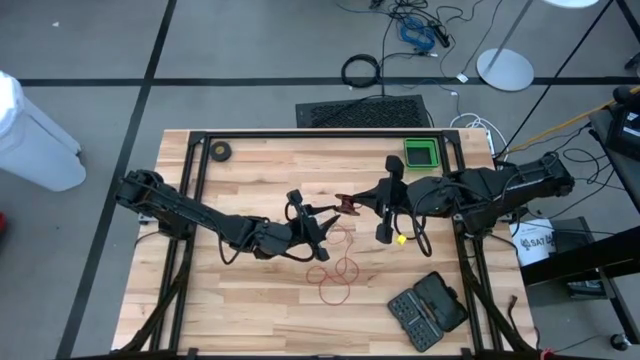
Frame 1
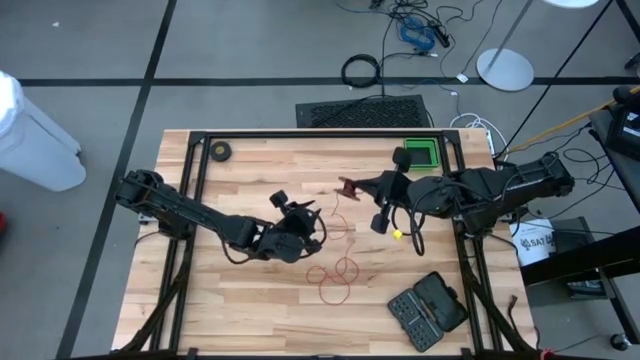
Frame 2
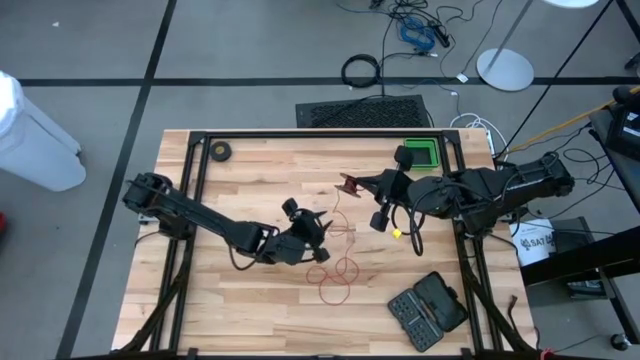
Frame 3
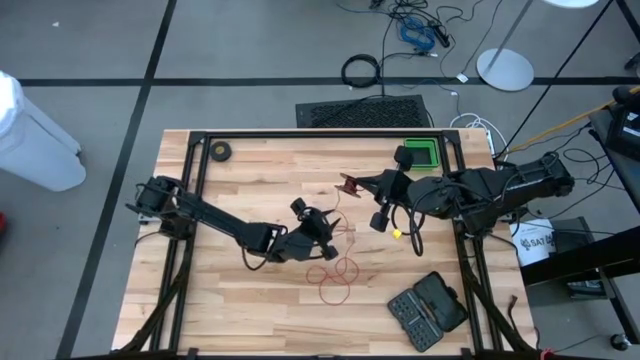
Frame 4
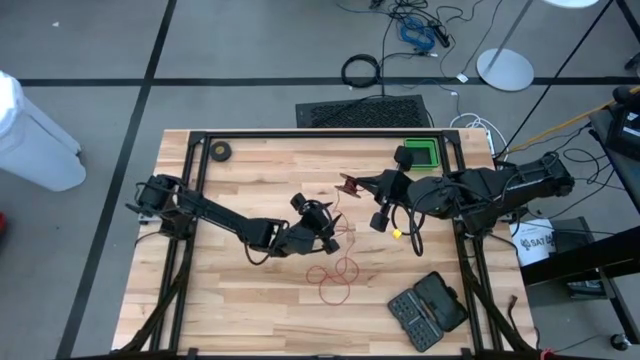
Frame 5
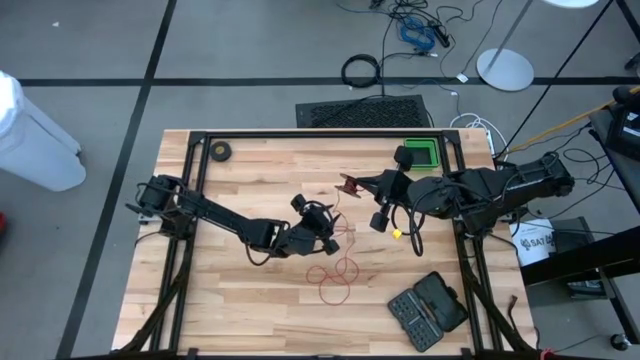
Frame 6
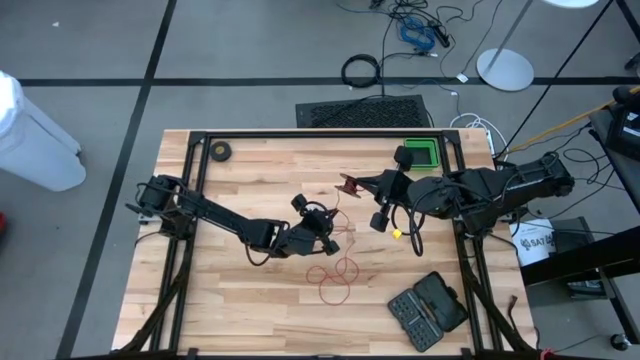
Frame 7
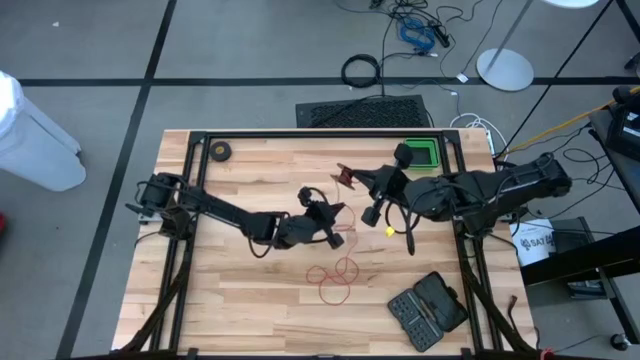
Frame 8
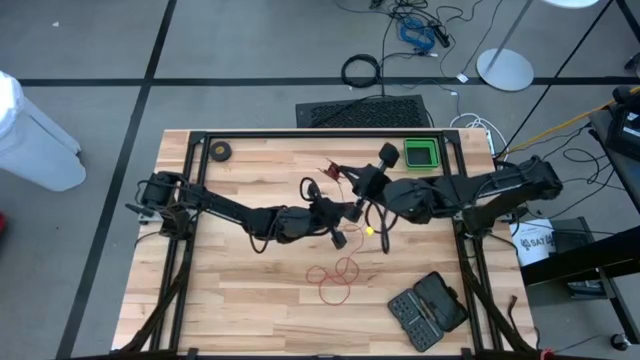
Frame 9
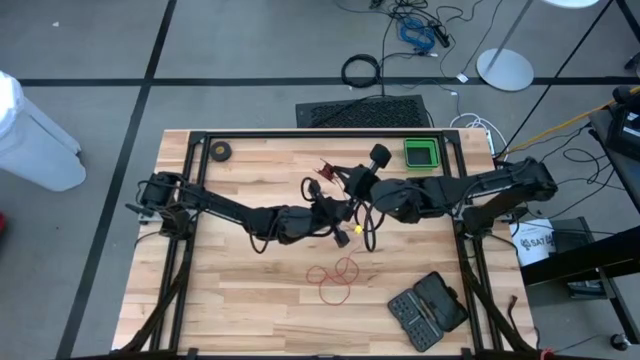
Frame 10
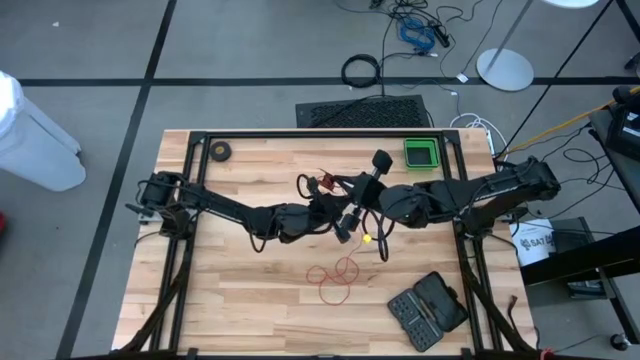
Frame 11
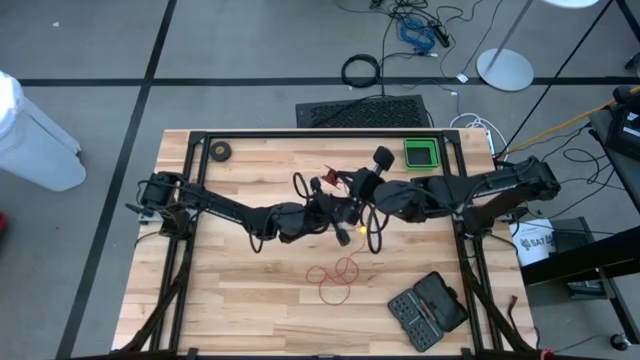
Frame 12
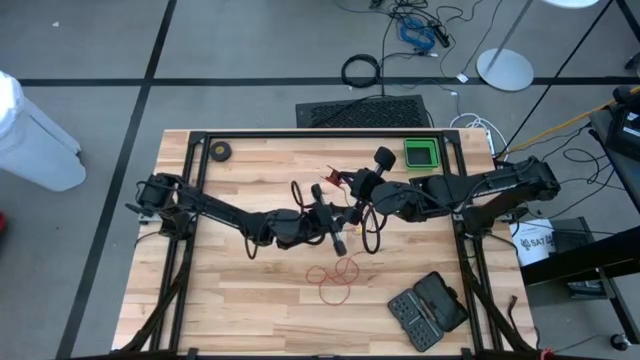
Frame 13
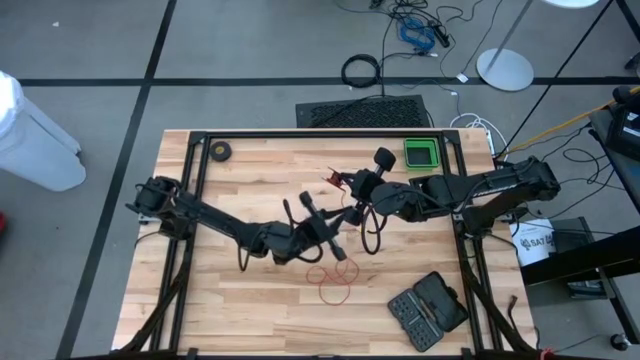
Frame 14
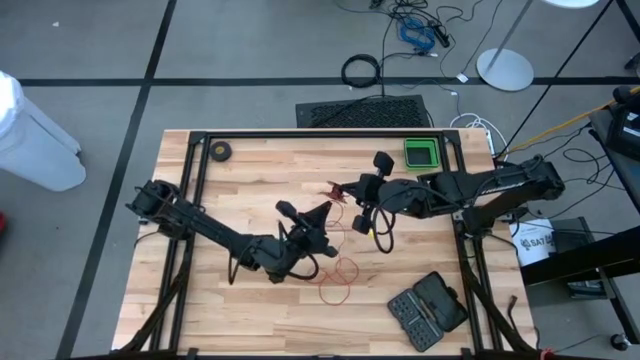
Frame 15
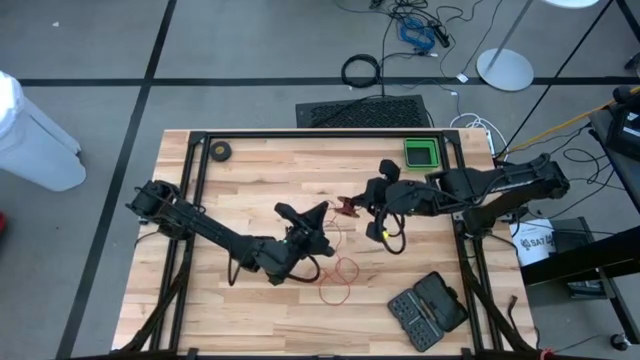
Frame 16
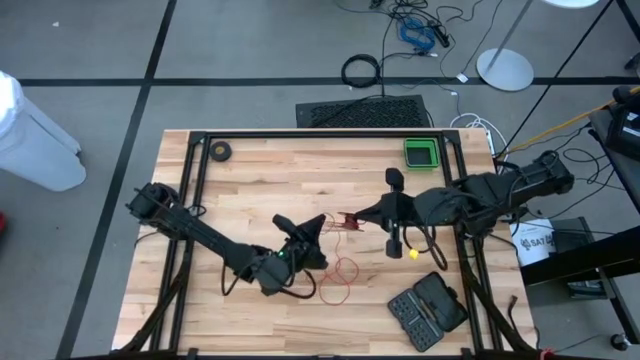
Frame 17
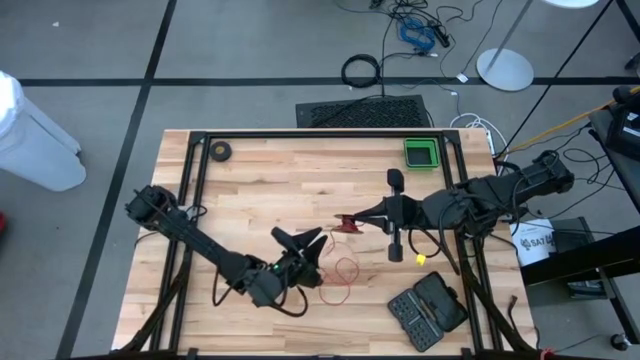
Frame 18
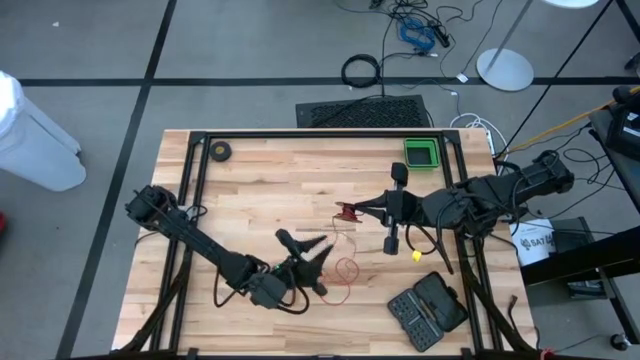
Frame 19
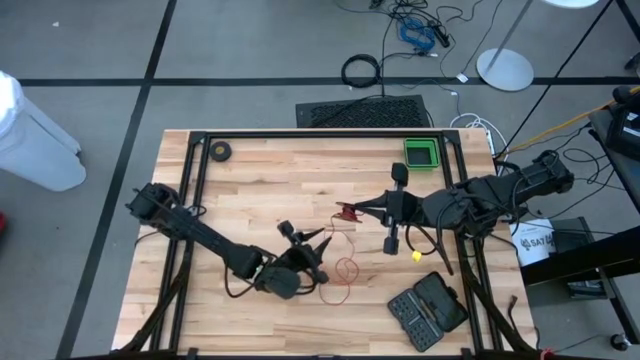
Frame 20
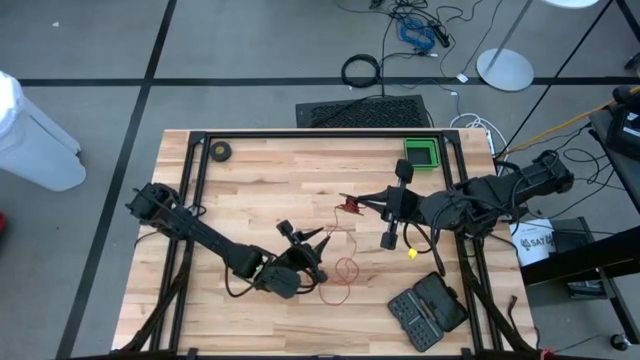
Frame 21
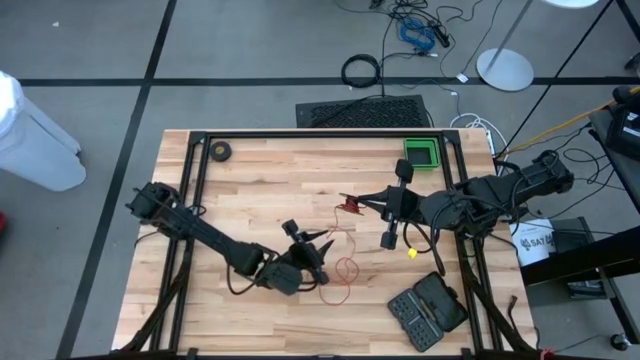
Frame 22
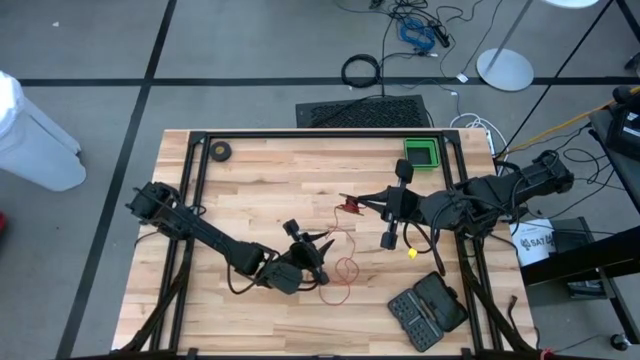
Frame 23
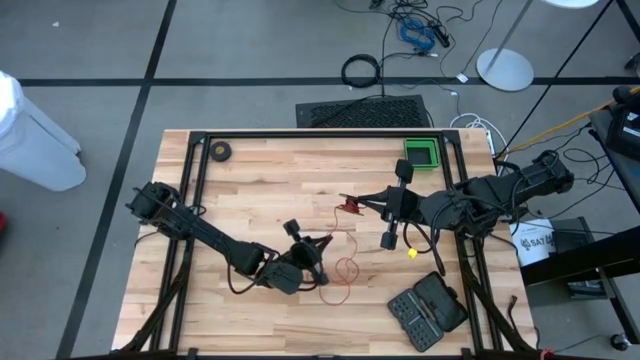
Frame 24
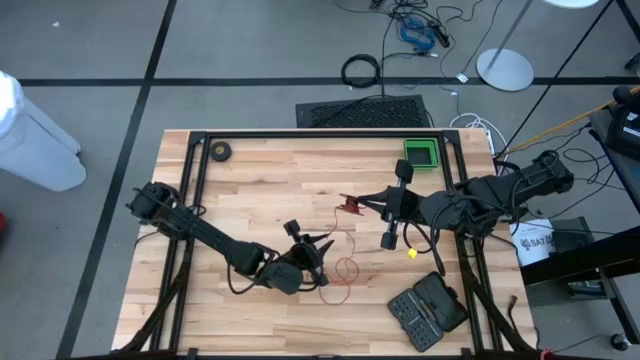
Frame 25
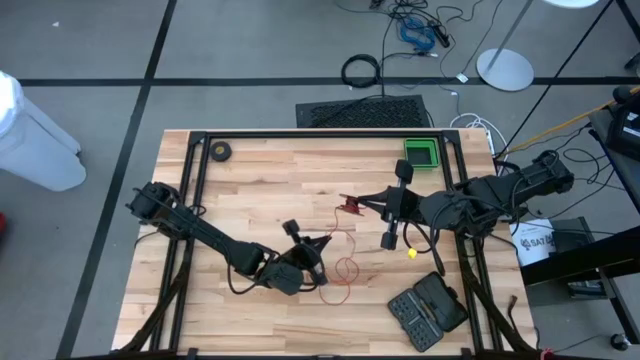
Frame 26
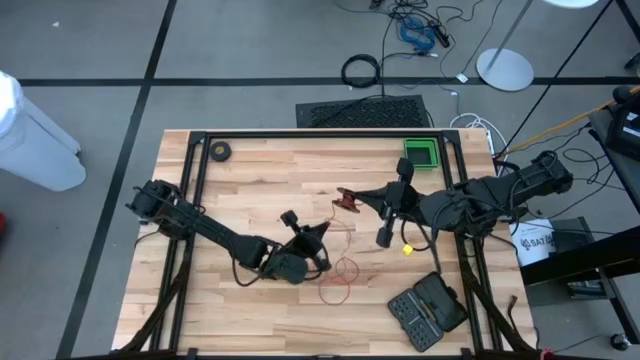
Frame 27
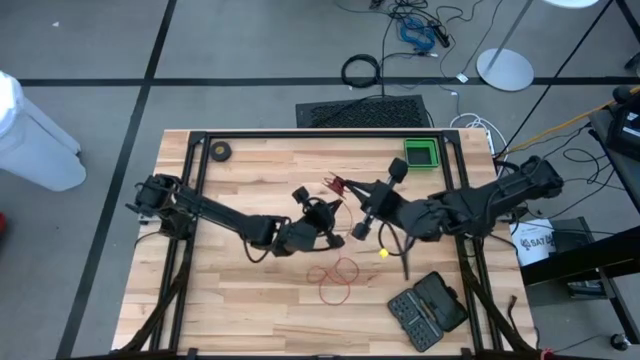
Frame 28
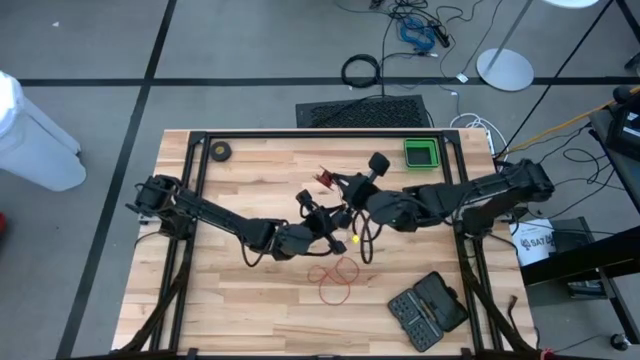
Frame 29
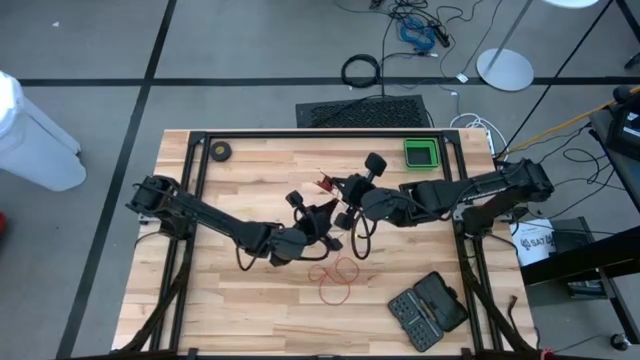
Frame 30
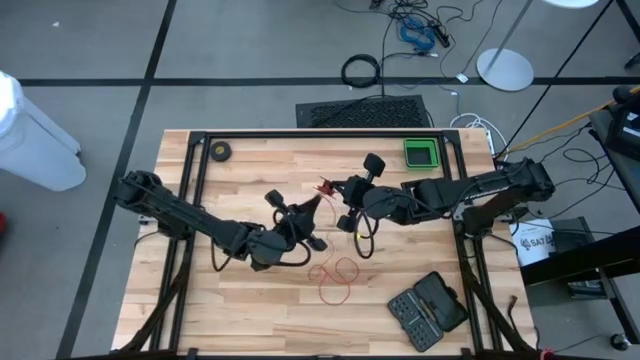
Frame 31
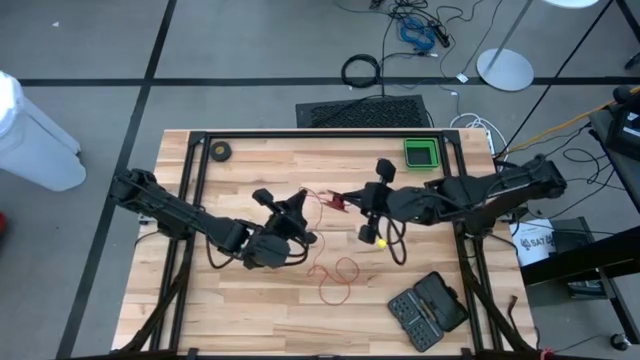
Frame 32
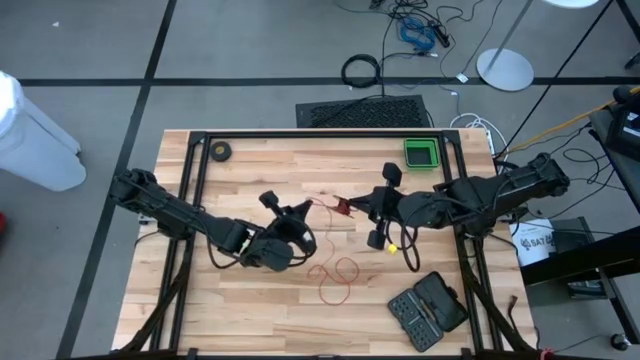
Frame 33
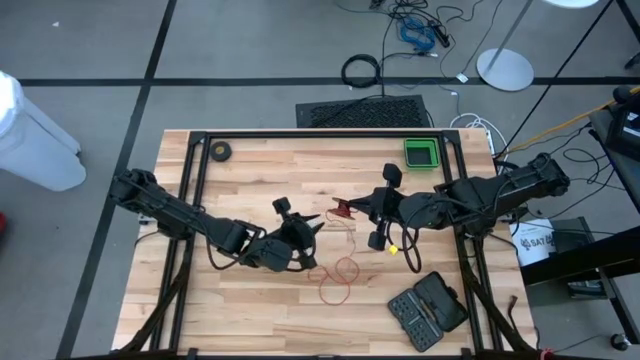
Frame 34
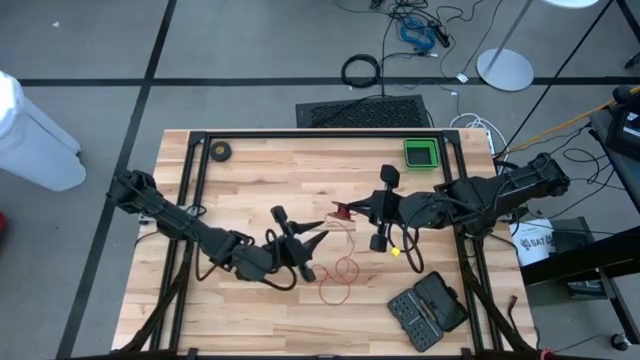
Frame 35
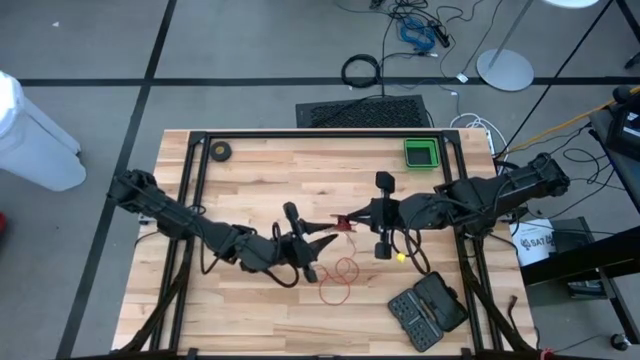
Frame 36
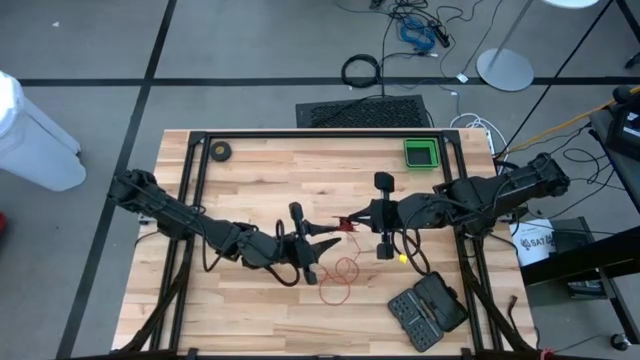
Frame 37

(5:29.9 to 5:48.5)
Task: Coil cords
Coil the red wire into the spool
